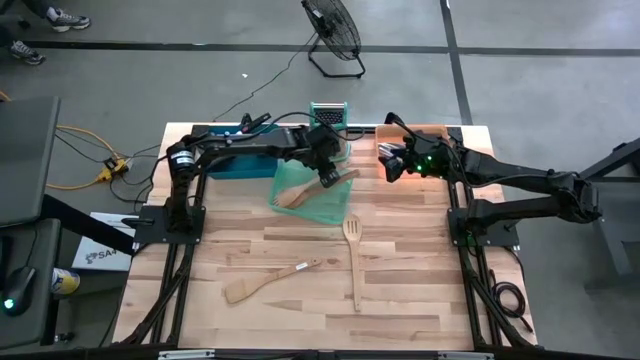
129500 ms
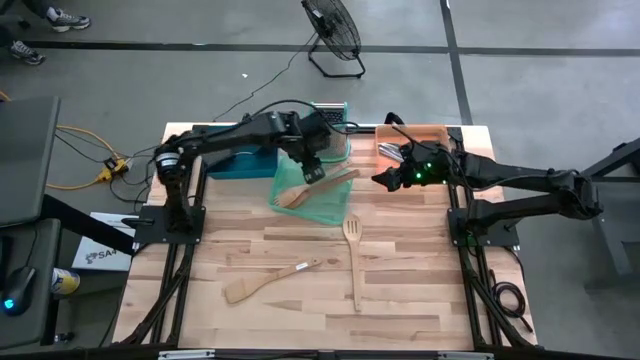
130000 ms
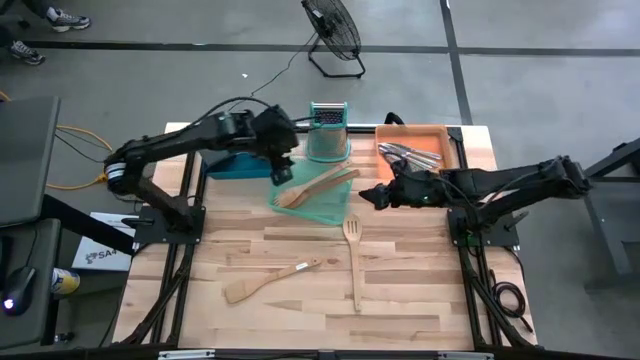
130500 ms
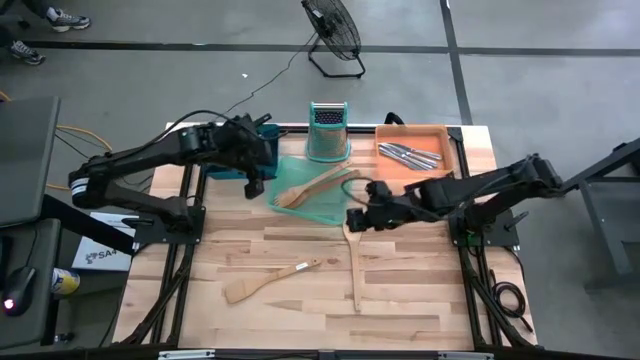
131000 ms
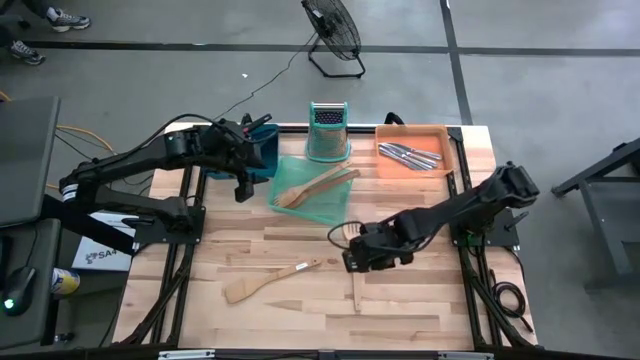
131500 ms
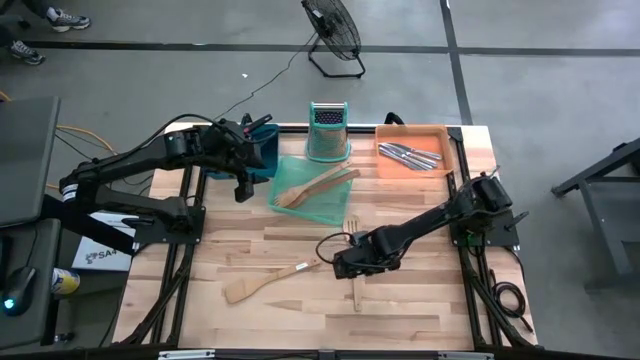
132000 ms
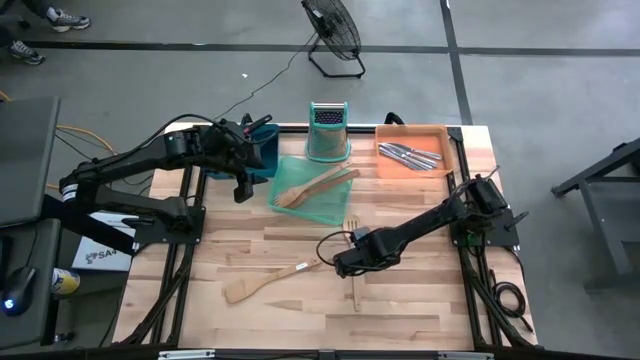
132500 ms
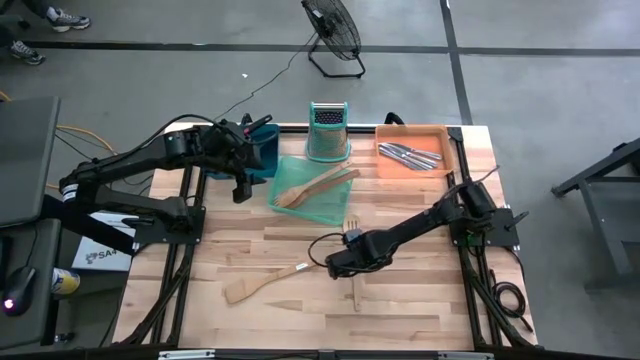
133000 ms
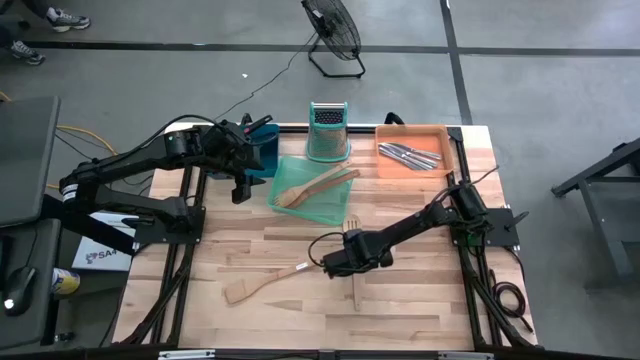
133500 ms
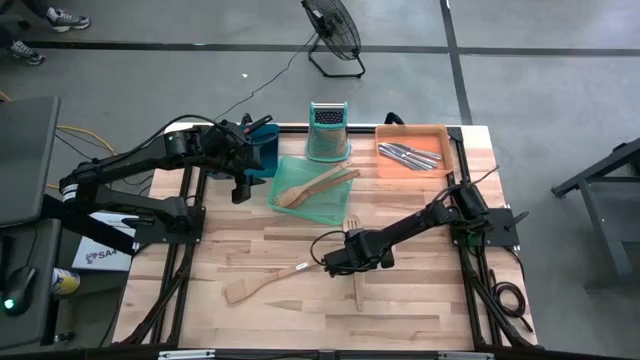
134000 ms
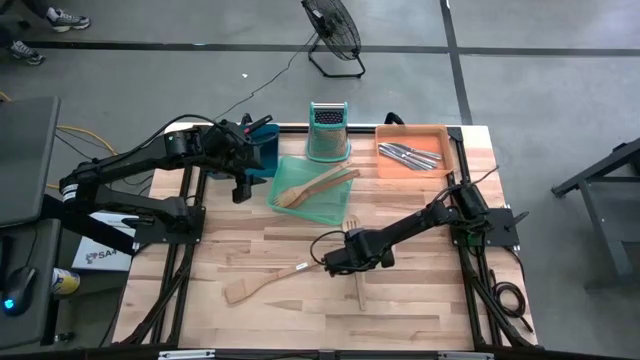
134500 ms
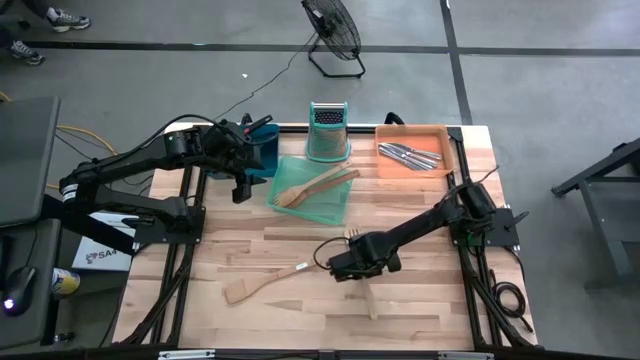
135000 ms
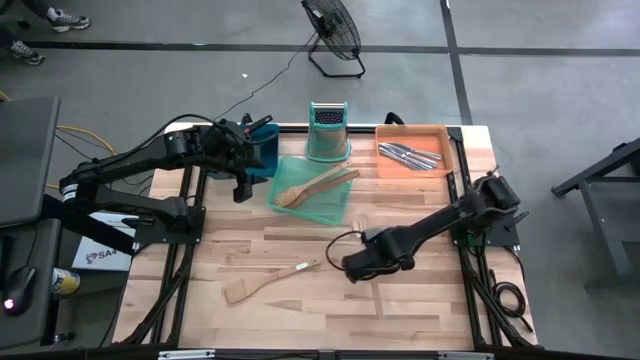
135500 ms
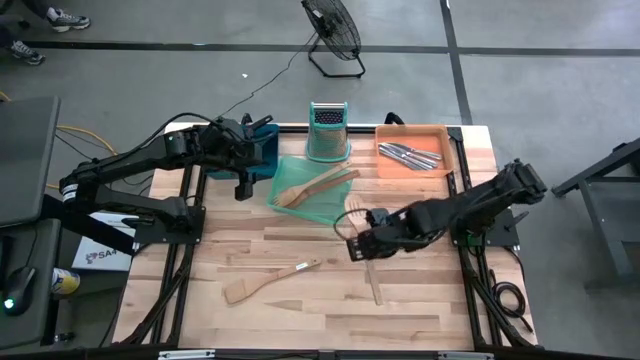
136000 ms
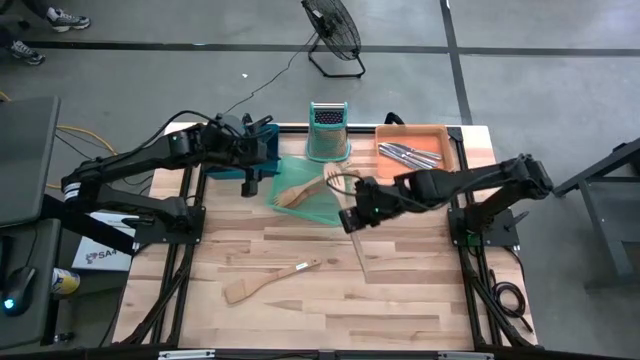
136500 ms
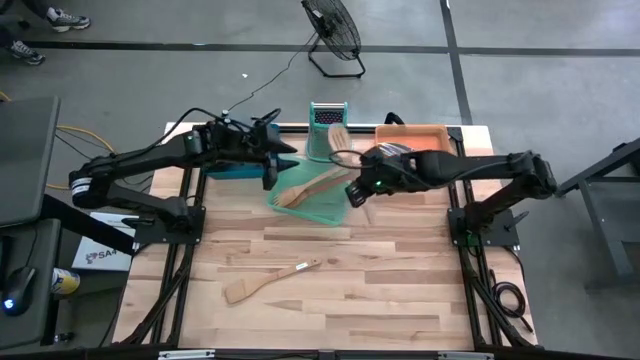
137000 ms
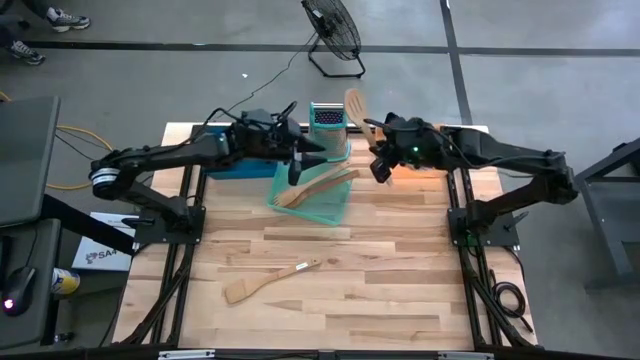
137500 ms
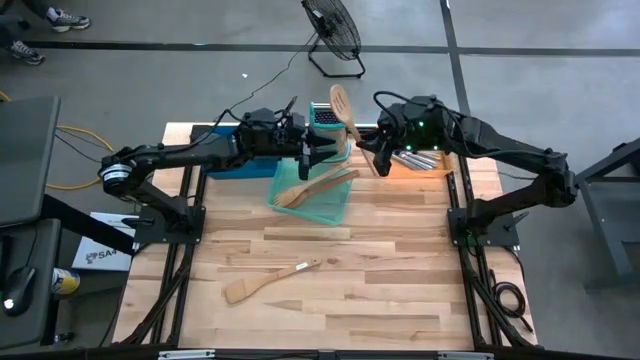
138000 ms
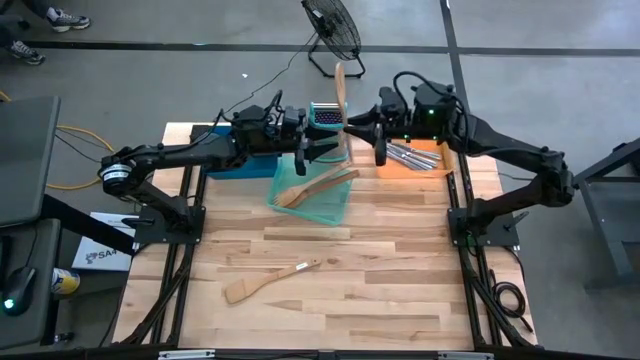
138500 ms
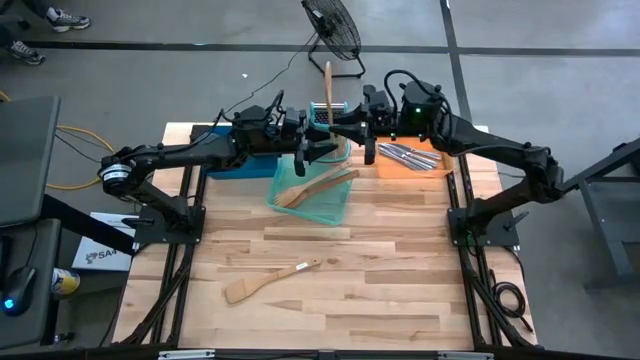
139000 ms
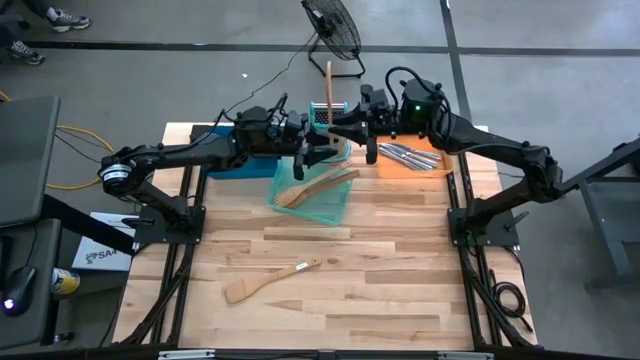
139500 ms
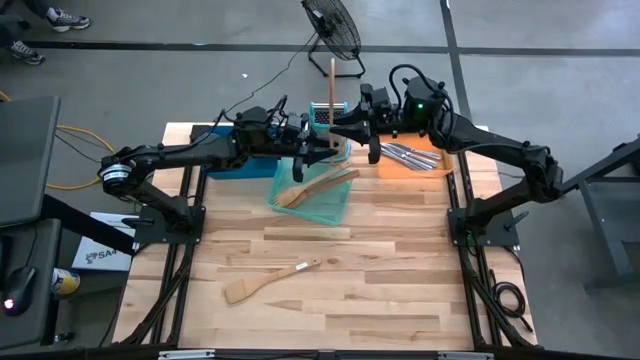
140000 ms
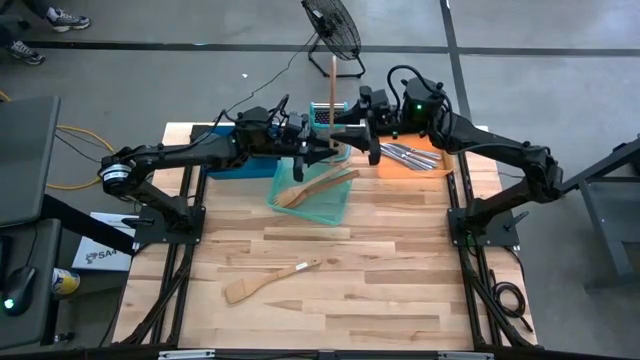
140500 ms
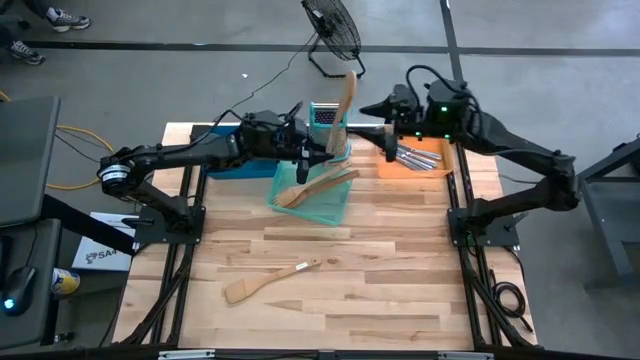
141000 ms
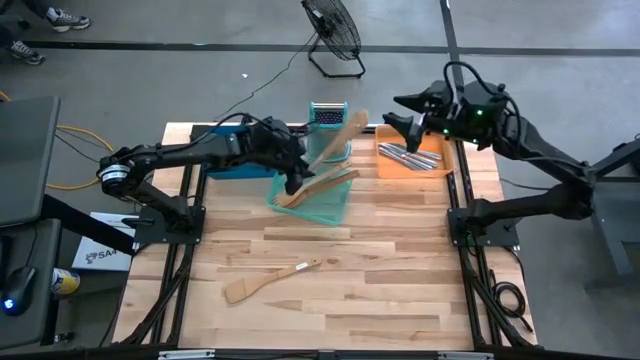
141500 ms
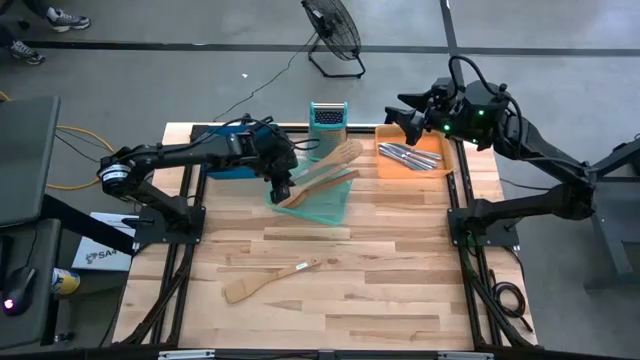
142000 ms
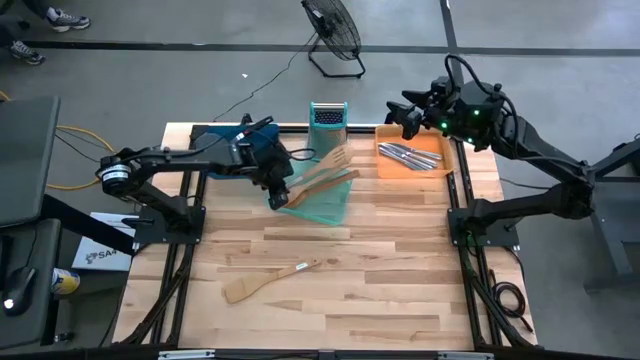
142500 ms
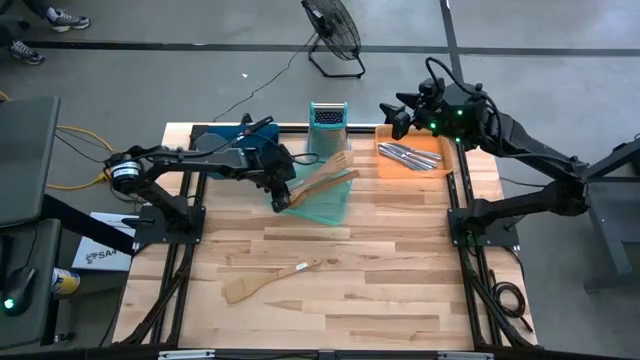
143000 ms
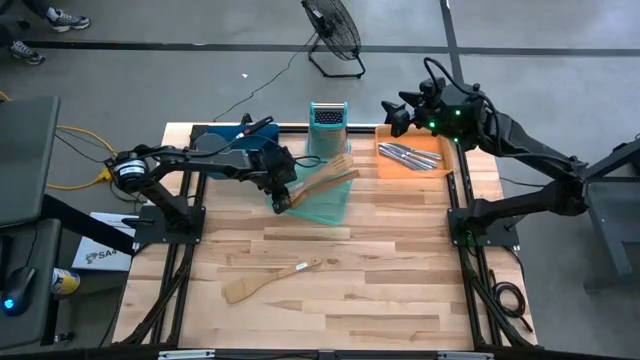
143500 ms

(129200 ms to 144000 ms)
Task: Pick & Place Kitchen Items
Put the wooden spoon into the green bin

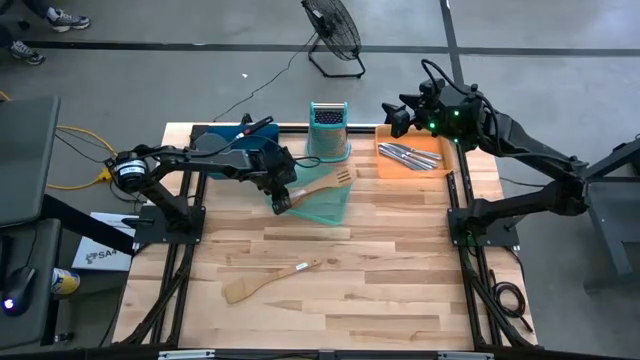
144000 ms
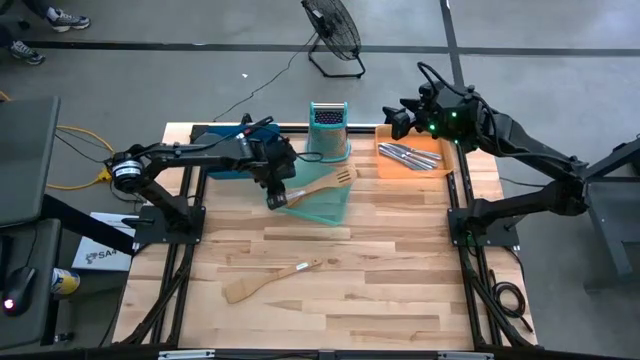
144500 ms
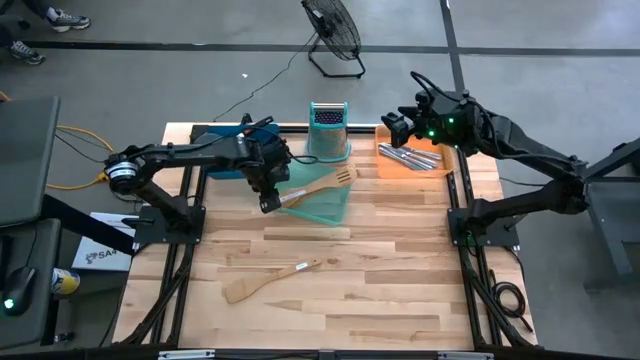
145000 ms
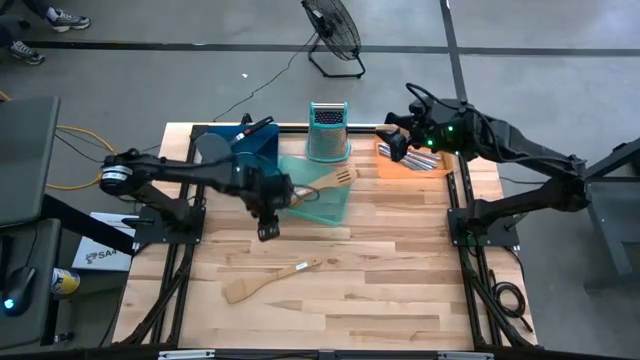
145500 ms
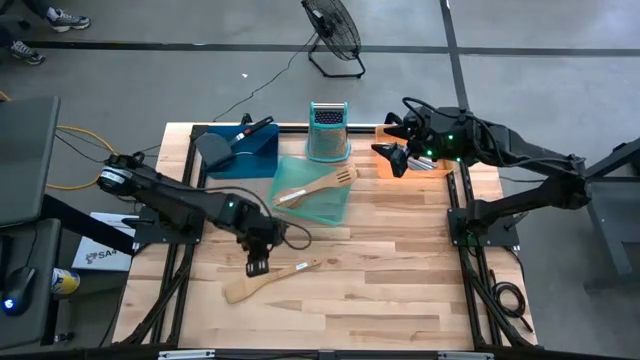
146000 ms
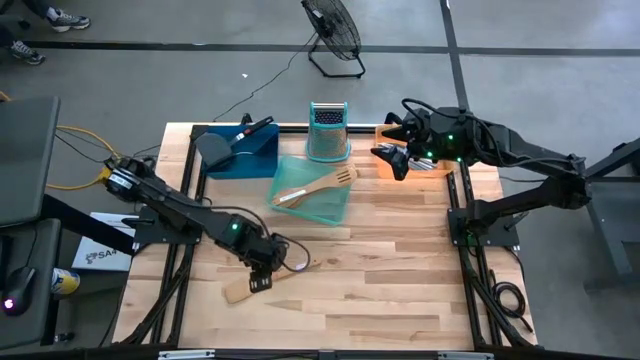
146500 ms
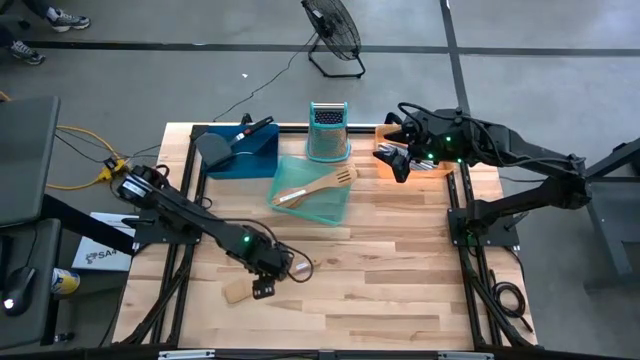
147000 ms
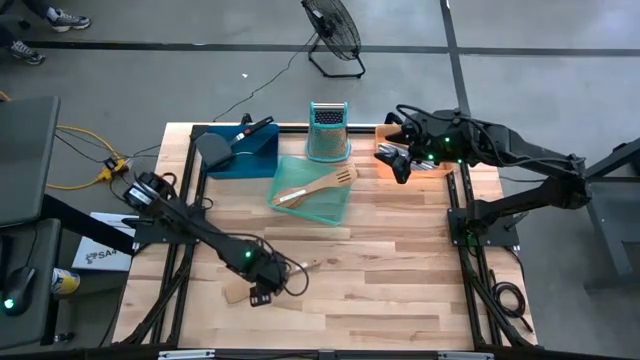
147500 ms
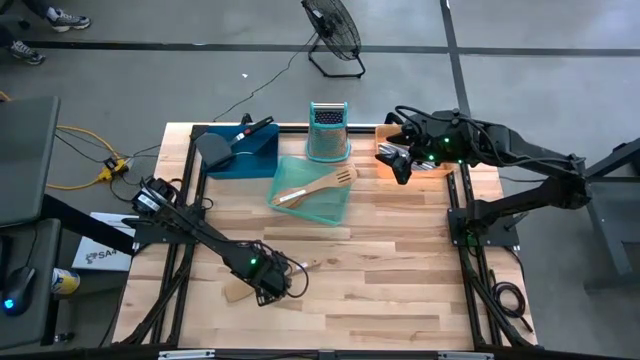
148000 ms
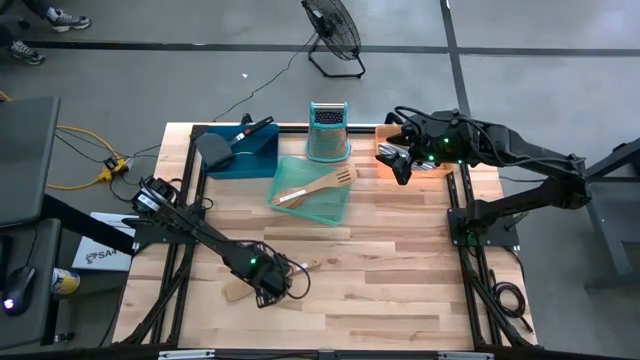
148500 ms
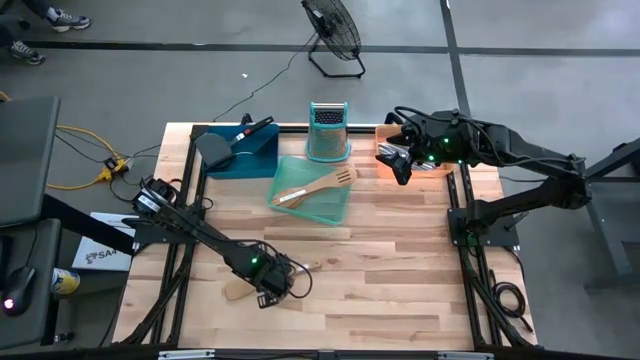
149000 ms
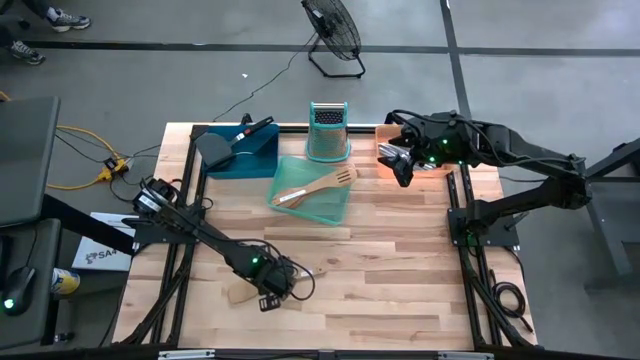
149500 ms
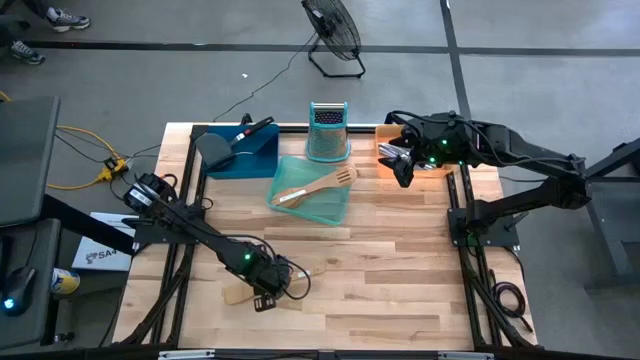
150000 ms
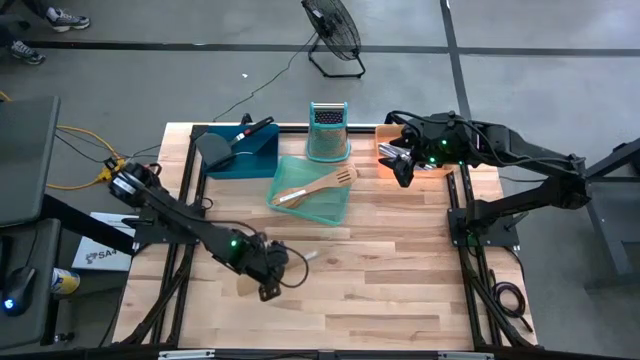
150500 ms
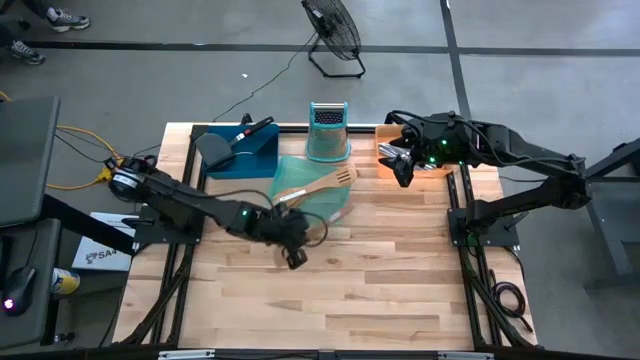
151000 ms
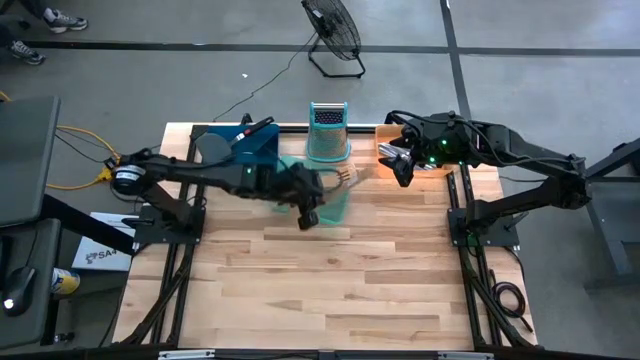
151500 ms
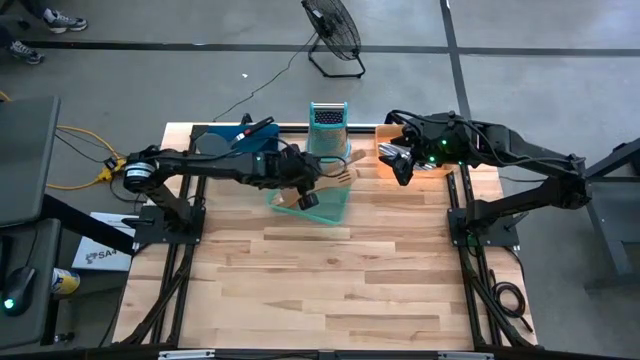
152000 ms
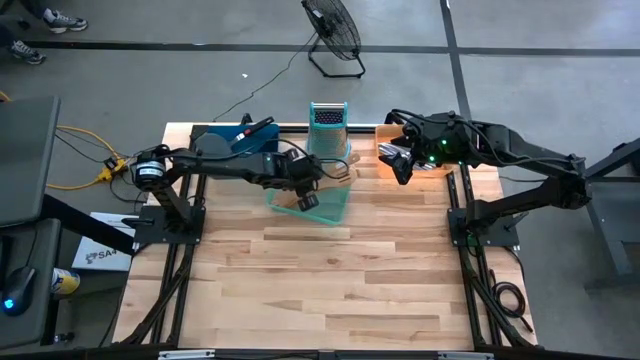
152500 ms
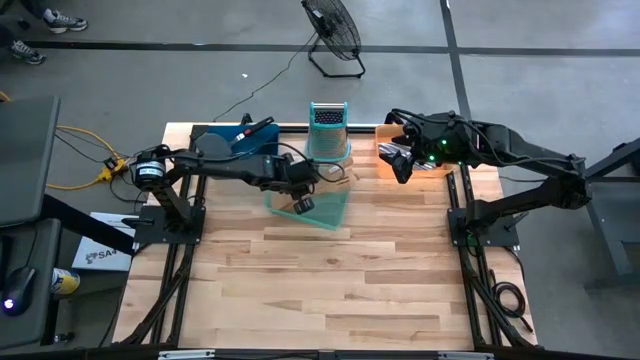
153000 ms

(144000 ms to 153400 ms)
Put the wooden spoon into the green bin
